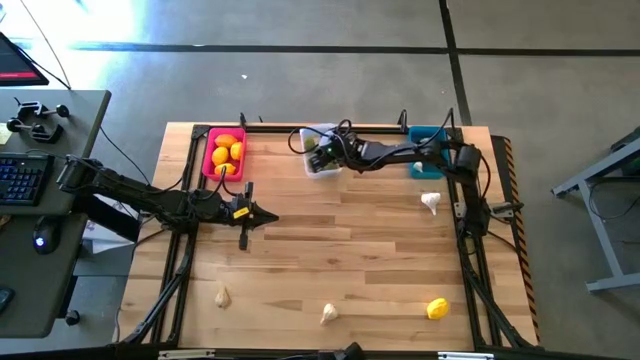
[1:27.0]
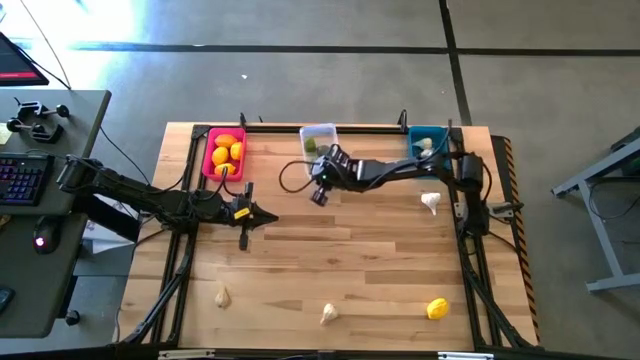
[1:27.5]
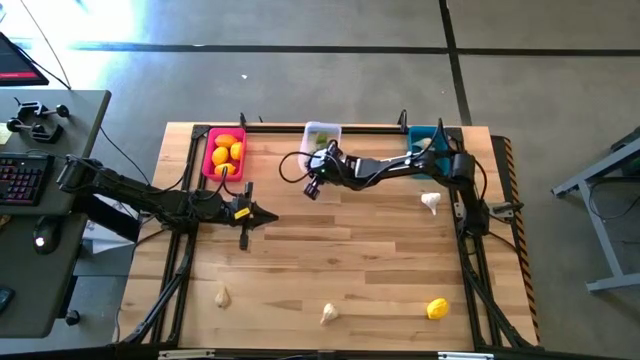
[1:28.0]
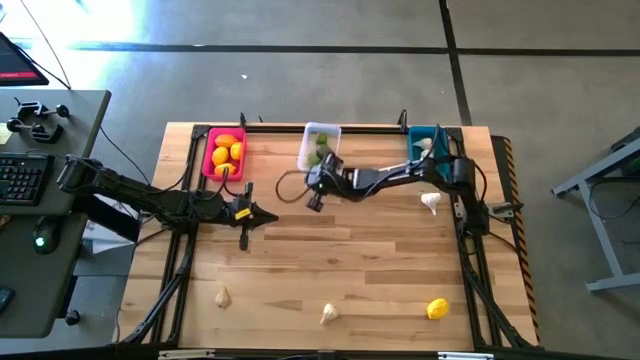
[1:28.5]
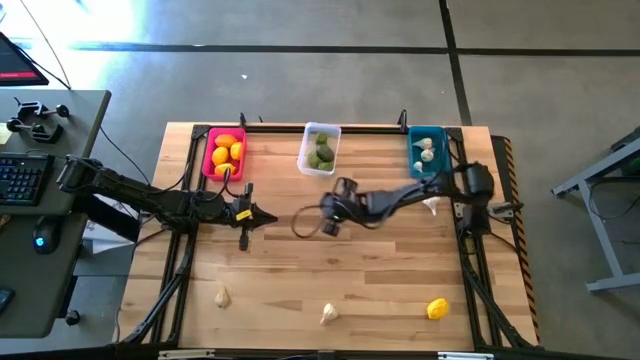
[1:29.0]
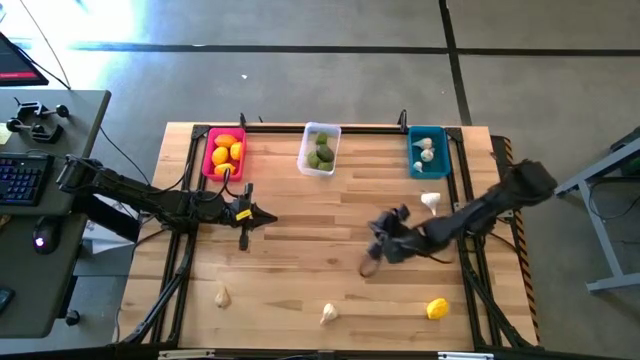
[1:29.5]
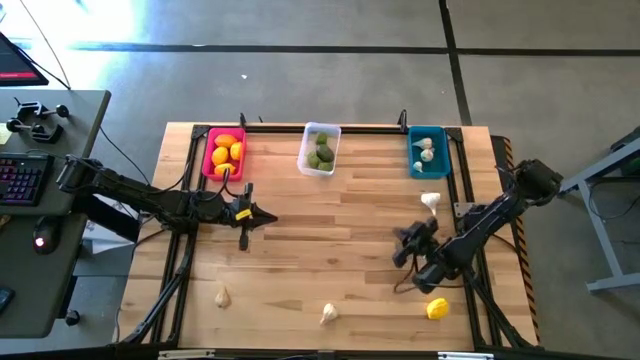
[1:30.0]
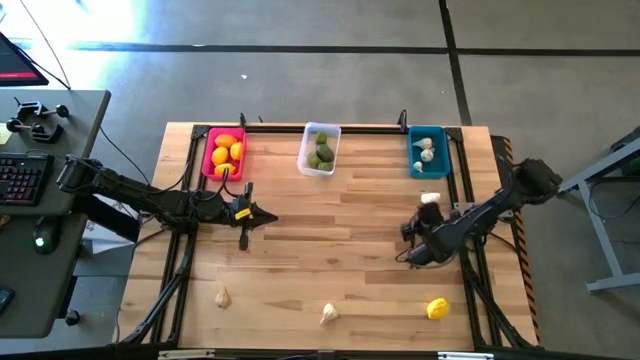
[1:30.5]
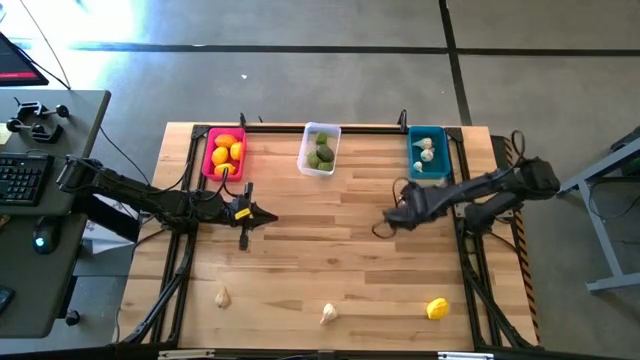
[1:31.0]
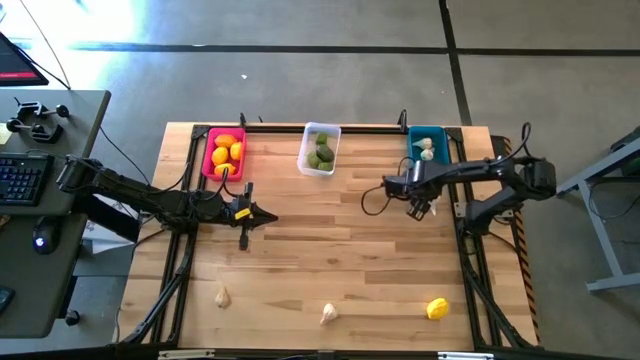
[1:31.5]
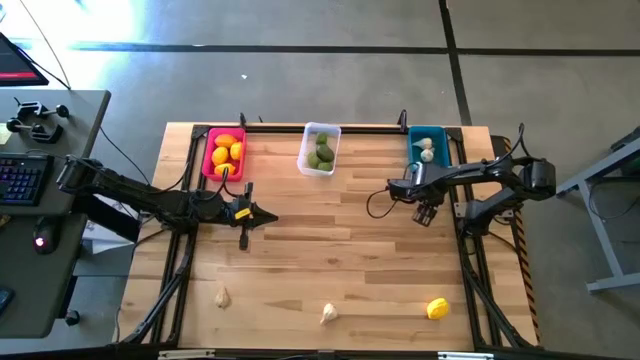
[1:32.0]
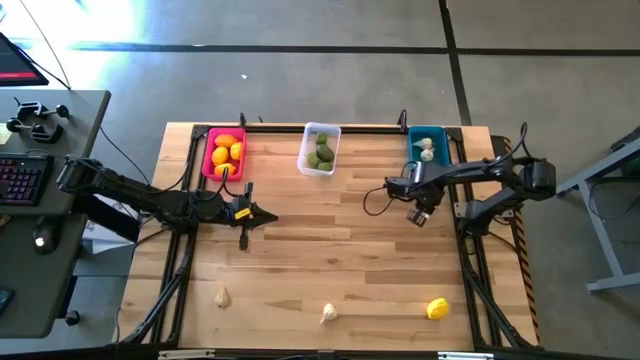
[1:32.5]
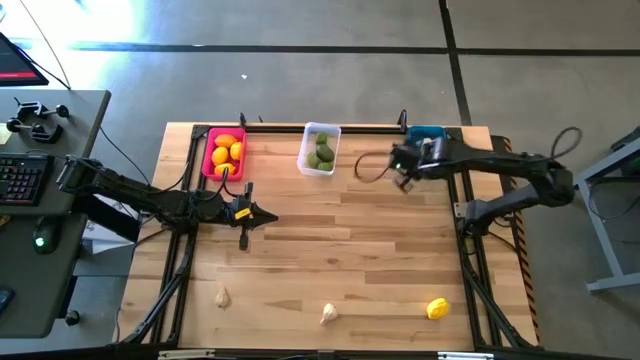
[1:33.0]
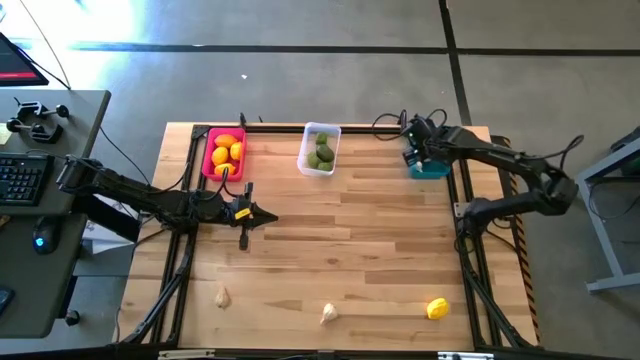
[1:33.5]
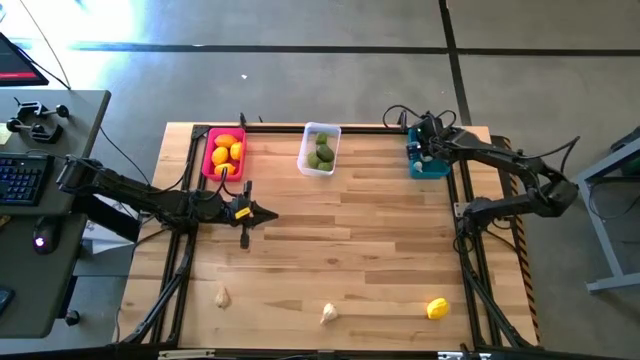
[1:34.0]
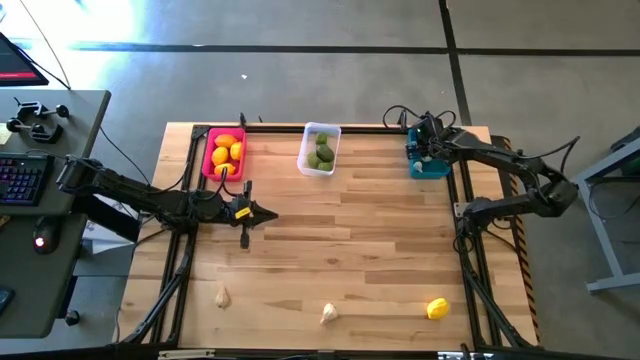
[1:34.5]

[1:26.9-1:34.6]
Task: Sort produce into baskets
Put the garlic into the blue bin

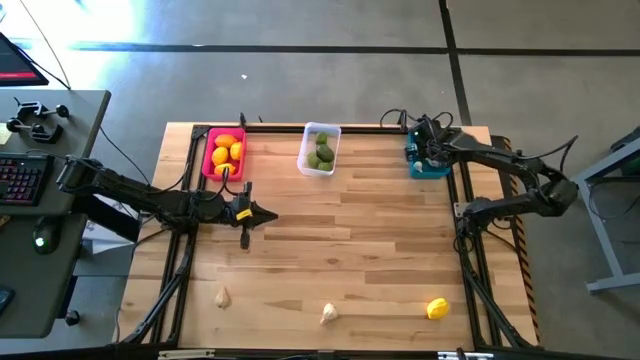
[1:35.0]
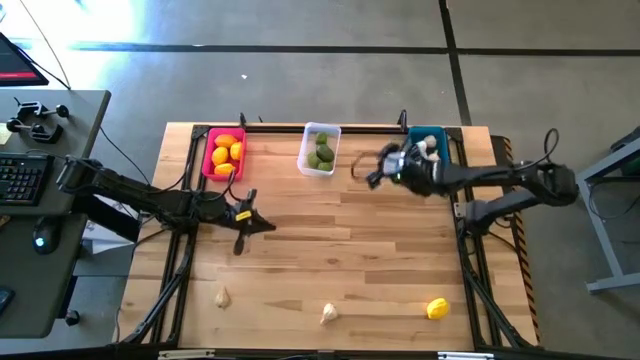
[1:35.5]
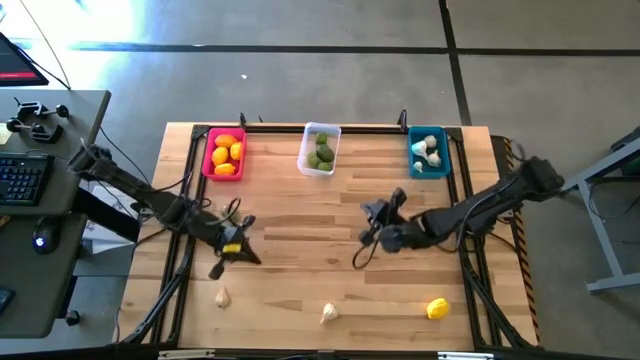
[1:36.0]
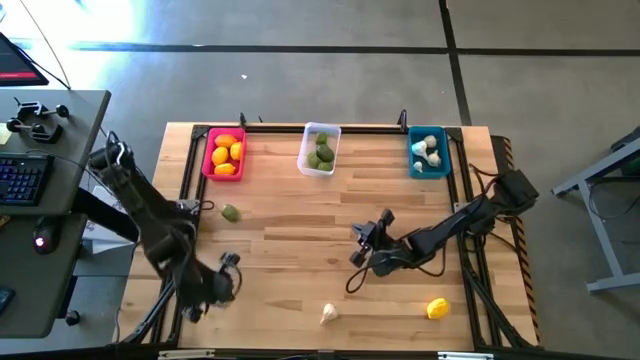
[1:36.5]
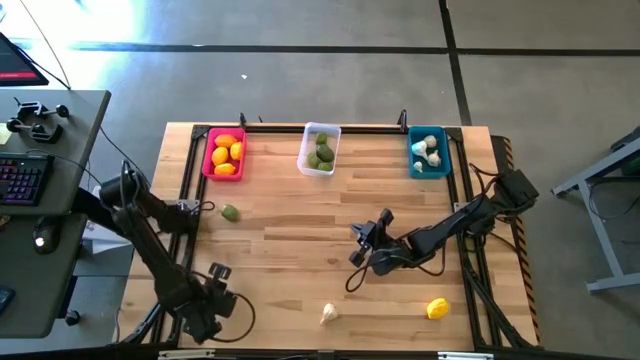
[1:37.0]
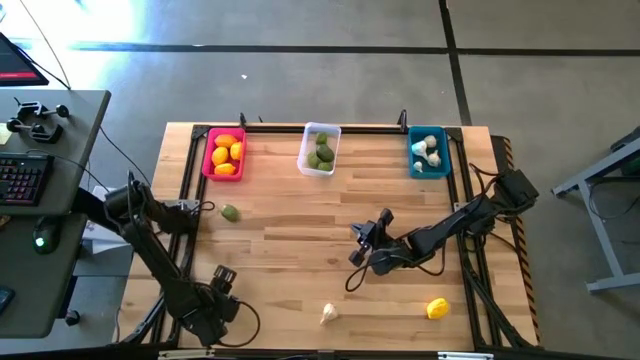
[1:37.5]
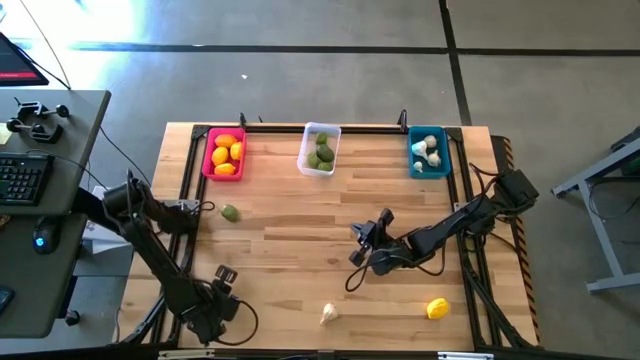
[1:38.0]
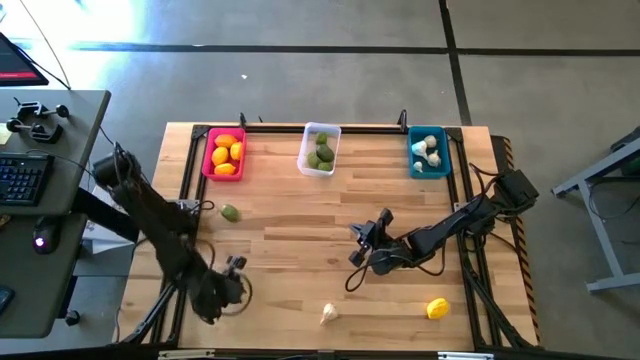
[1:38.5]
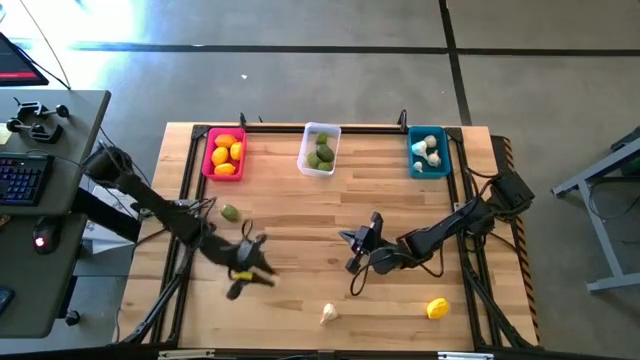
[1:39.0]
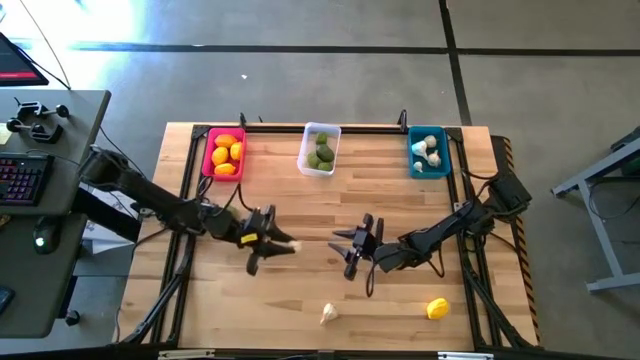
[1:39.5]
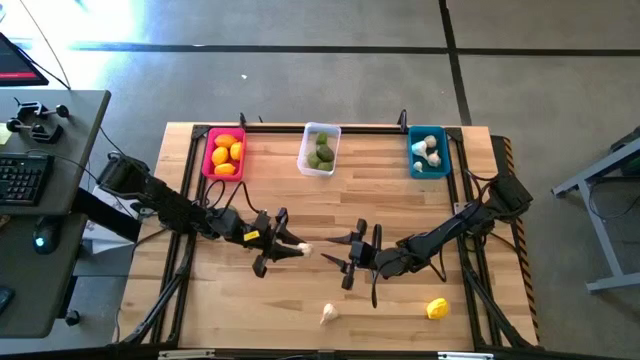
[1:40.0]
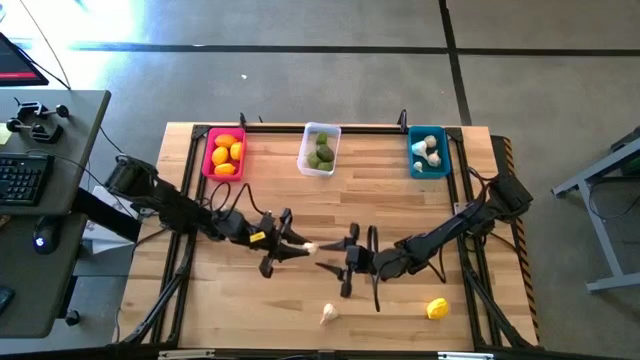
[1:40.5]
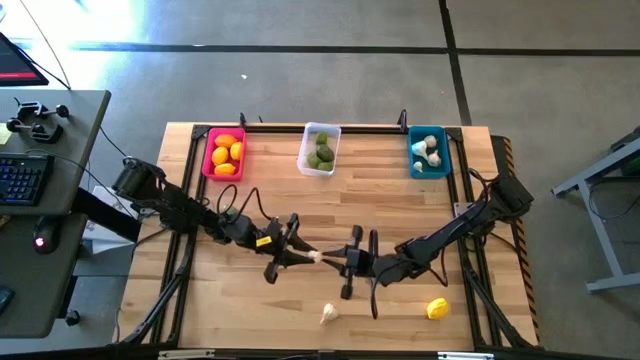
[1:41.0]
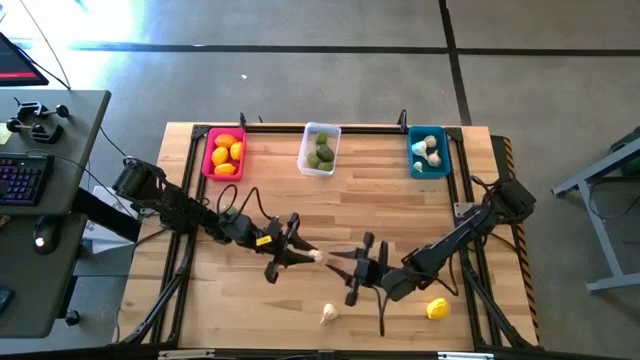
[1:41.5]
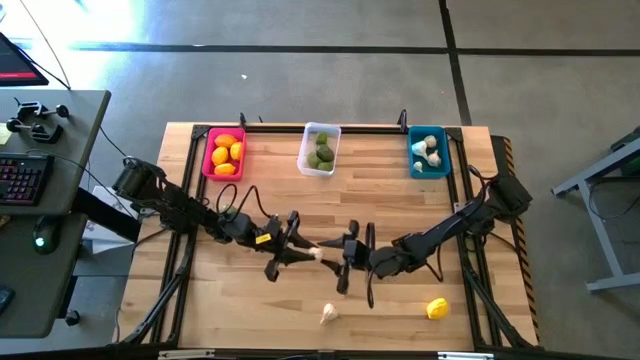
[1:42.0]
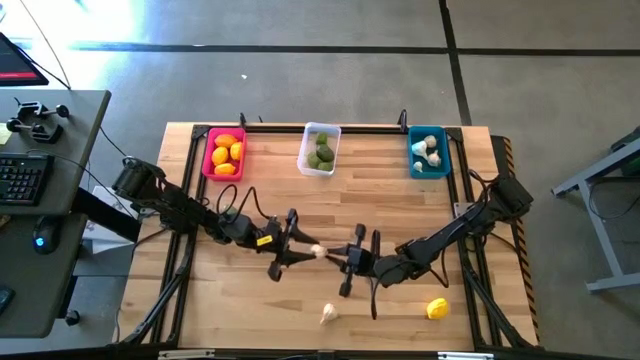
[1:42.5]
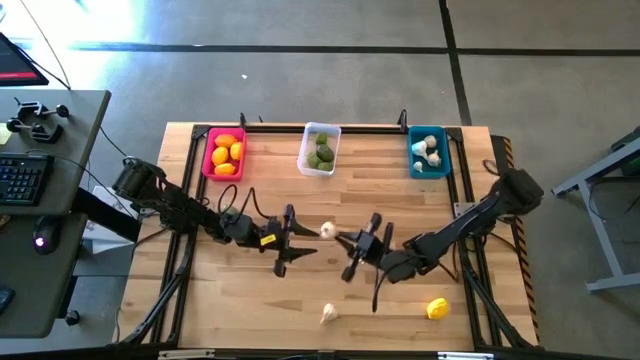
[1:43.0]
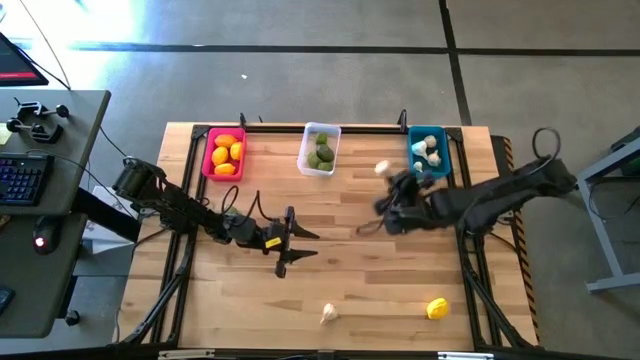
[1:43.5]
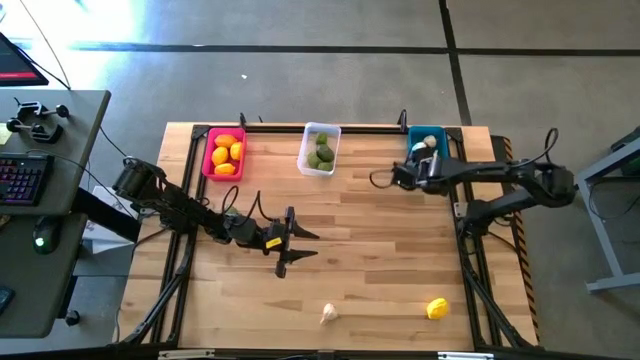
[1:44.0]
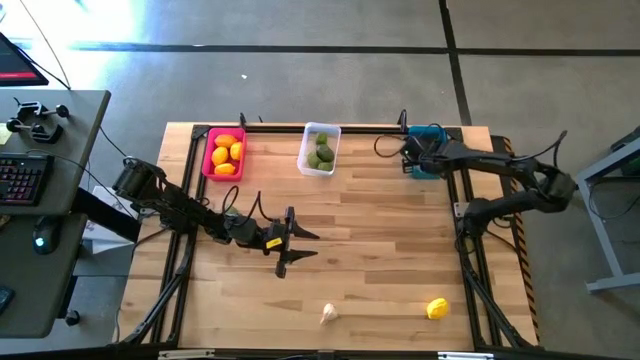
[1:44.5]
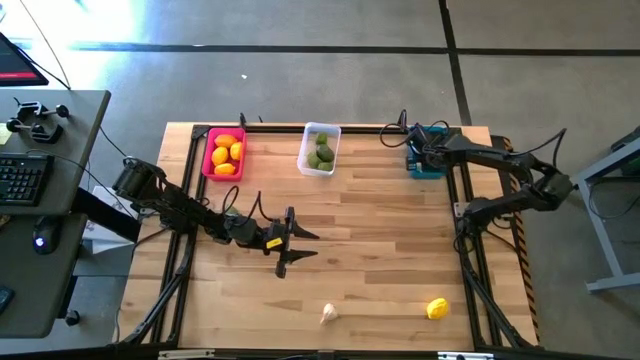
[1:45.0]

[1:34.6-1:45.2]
Put the garlic into the blue bin

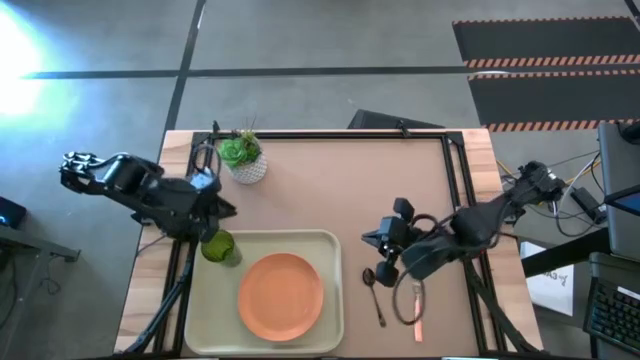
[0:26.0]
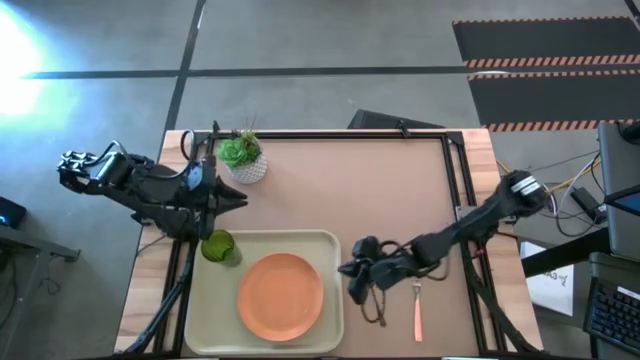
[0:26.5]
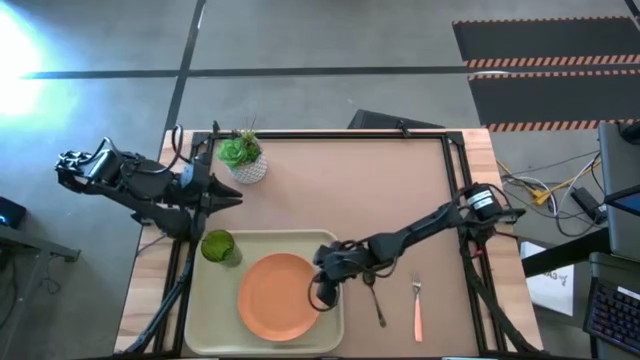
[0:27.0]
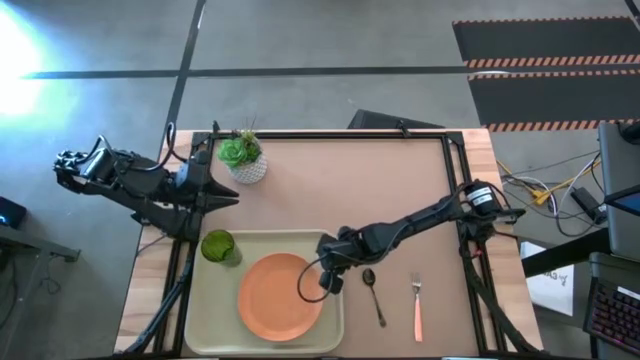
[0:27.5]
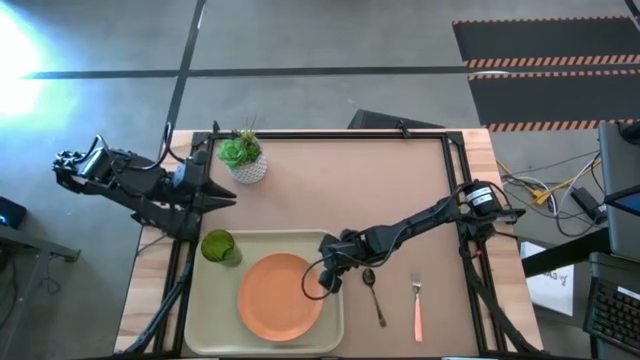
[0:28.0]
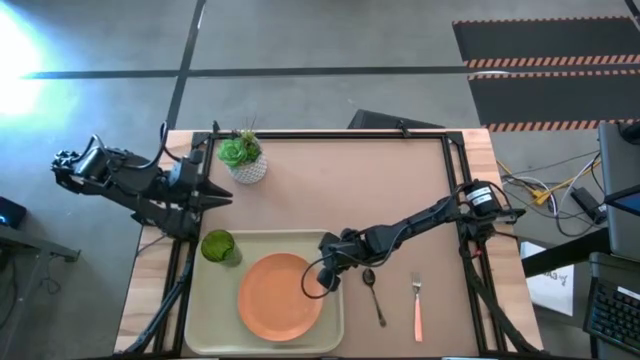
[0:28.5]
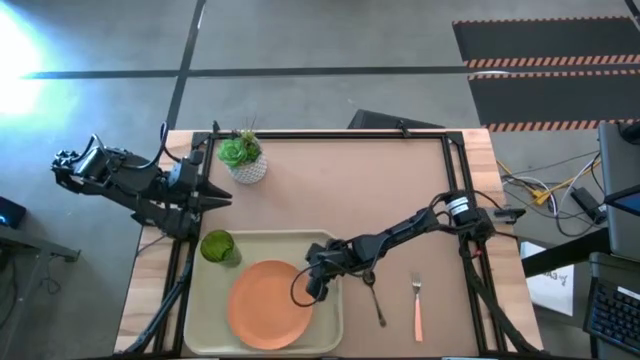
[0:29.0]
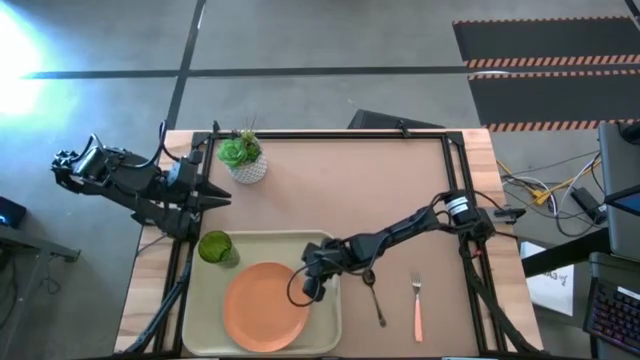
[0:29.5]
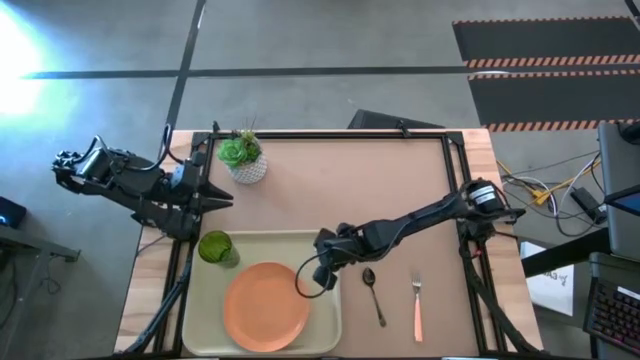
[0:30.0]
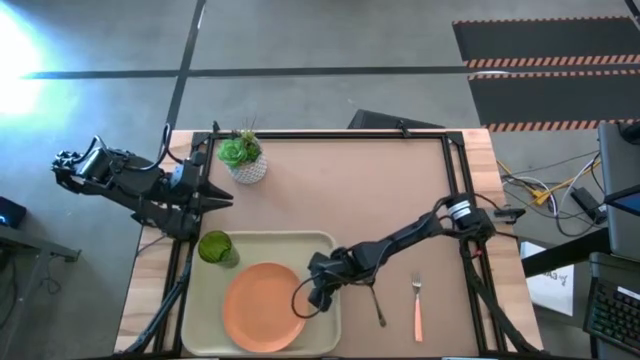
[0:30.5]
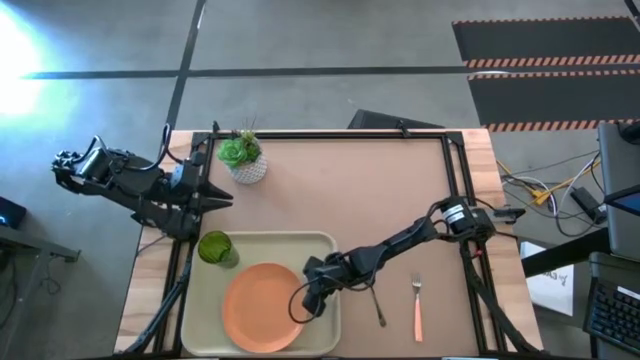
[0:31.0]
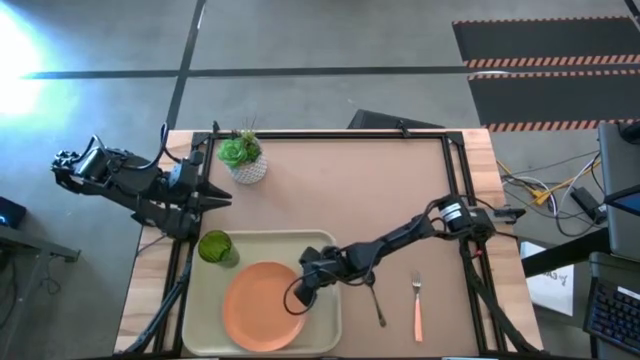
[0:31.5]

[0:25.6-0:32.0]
Task: Pick and place plate/cup/fork/spoon on tray
Adjust the orange plate on the white tray
